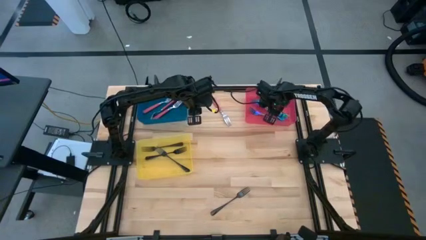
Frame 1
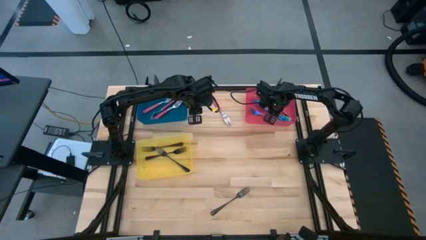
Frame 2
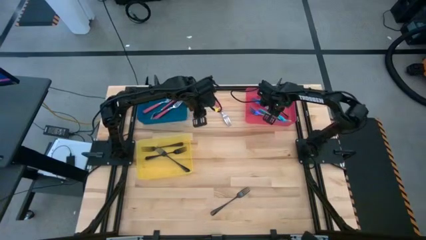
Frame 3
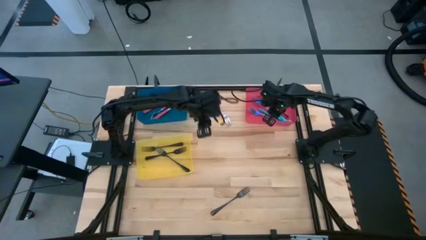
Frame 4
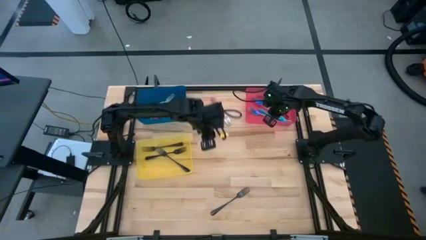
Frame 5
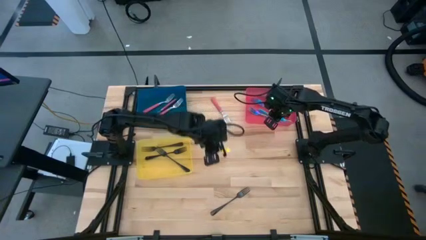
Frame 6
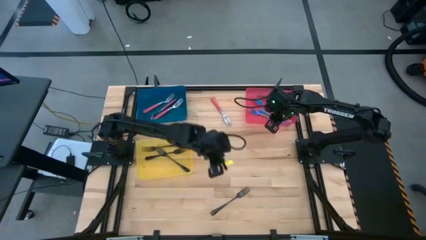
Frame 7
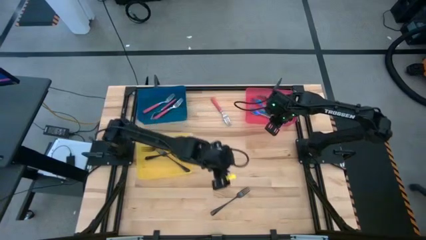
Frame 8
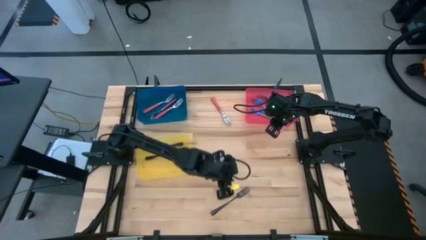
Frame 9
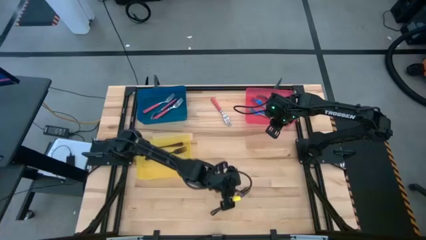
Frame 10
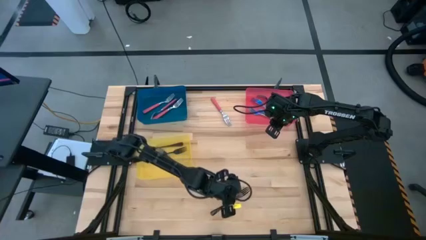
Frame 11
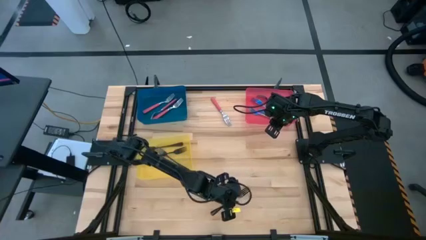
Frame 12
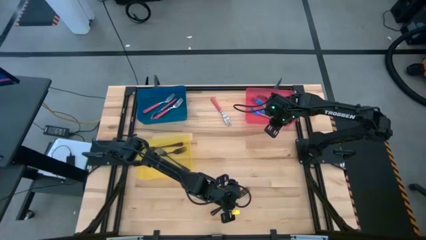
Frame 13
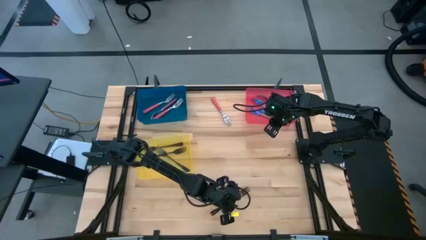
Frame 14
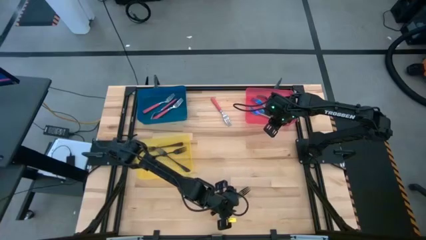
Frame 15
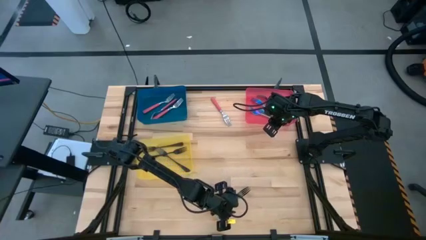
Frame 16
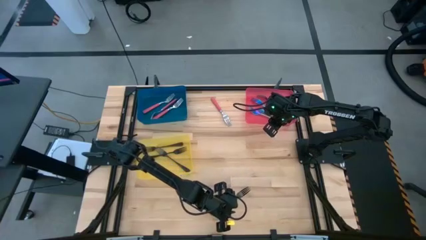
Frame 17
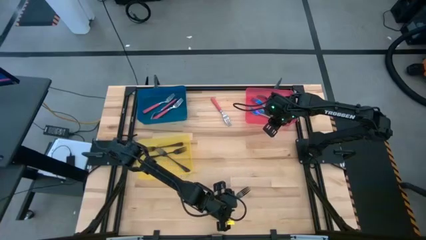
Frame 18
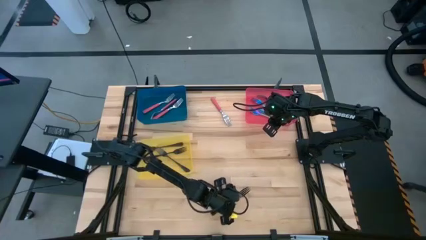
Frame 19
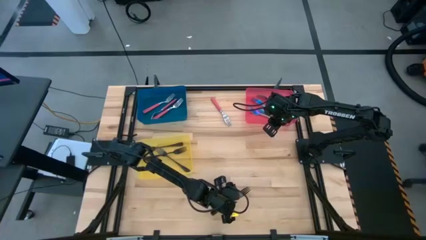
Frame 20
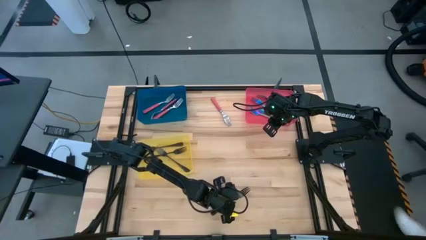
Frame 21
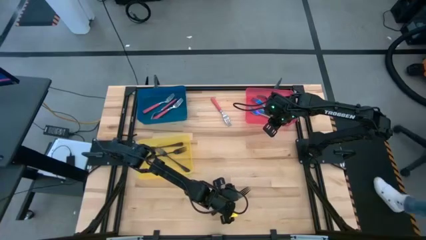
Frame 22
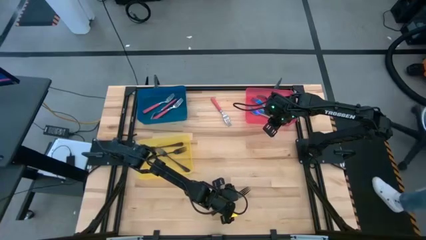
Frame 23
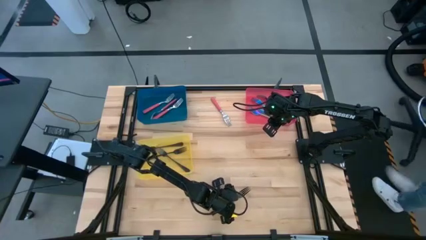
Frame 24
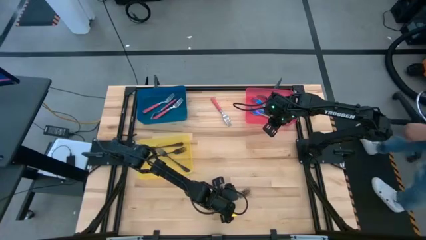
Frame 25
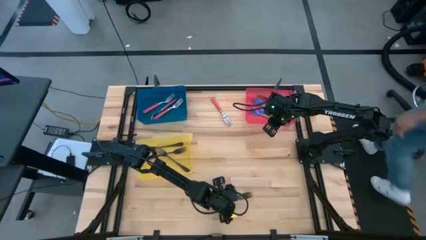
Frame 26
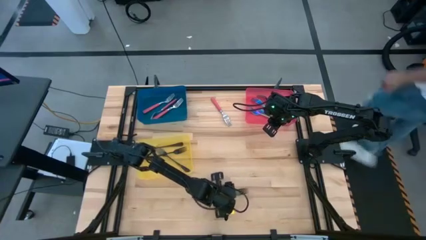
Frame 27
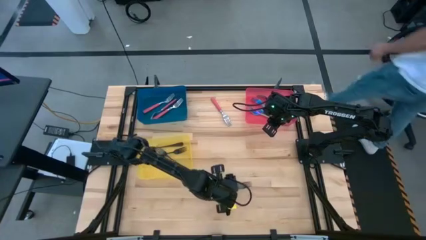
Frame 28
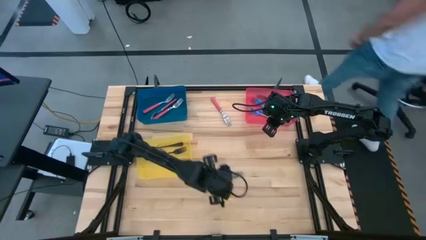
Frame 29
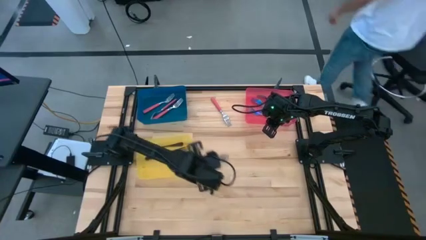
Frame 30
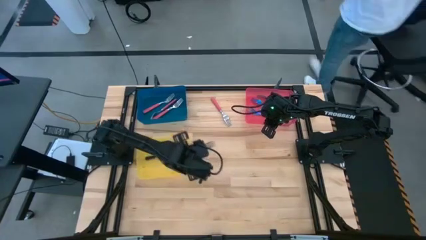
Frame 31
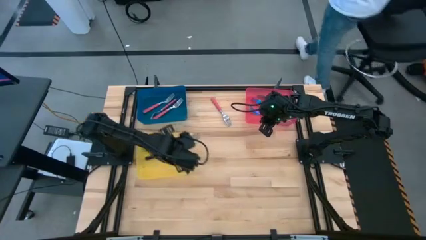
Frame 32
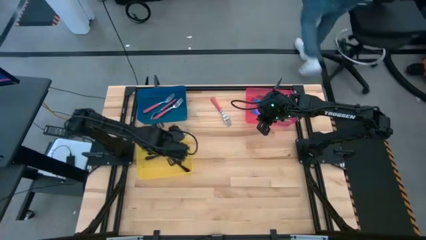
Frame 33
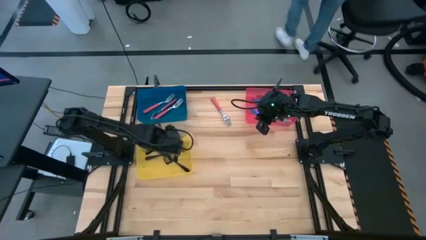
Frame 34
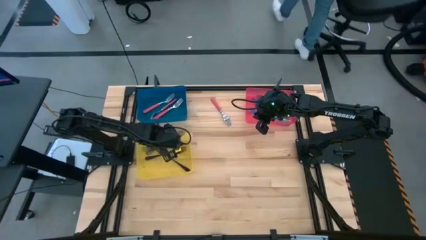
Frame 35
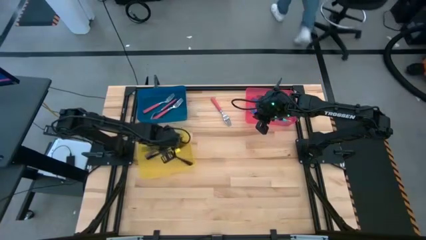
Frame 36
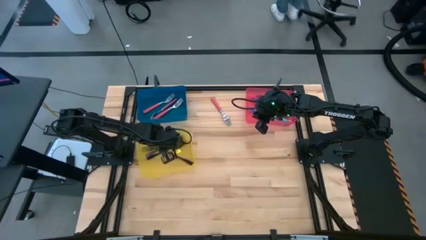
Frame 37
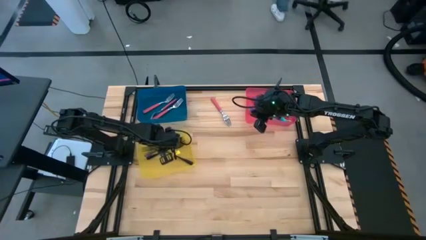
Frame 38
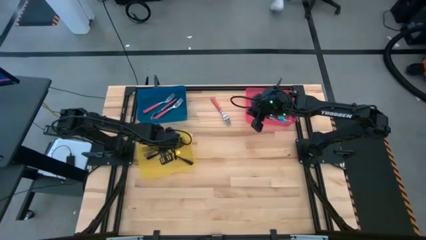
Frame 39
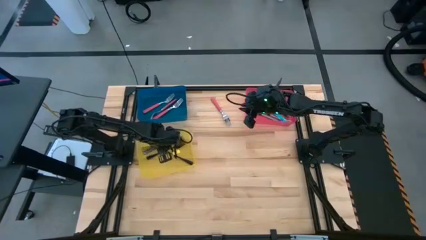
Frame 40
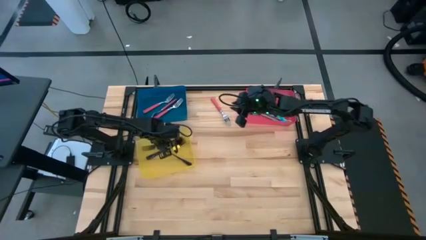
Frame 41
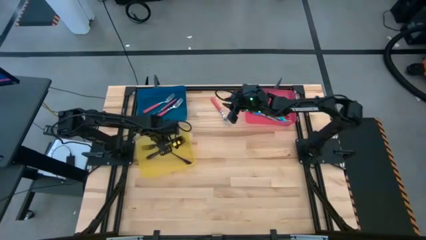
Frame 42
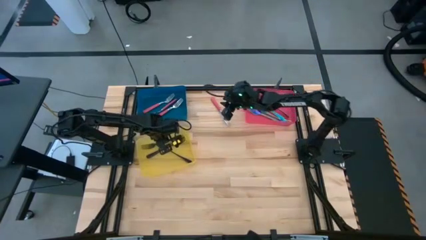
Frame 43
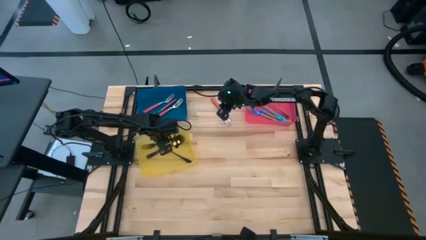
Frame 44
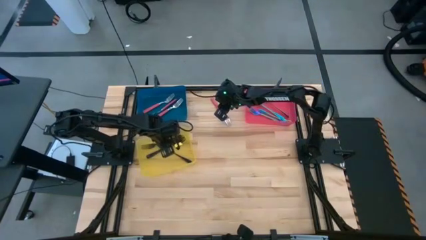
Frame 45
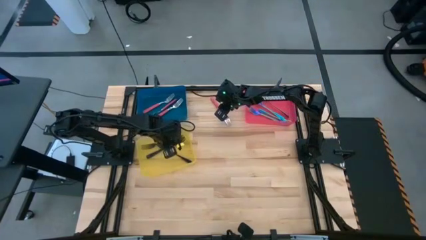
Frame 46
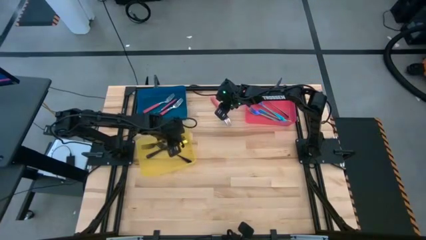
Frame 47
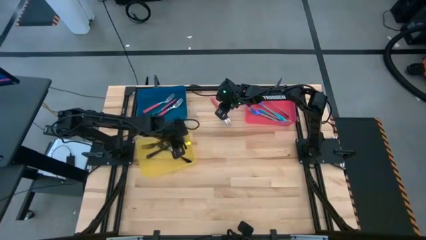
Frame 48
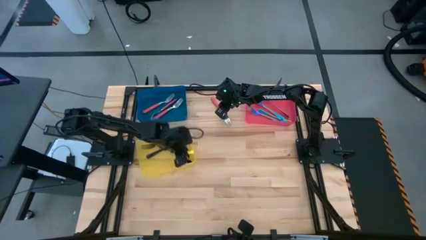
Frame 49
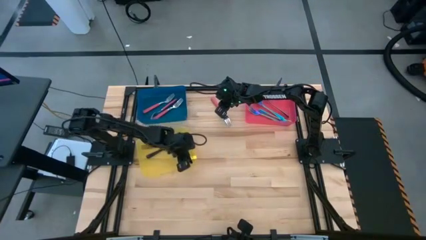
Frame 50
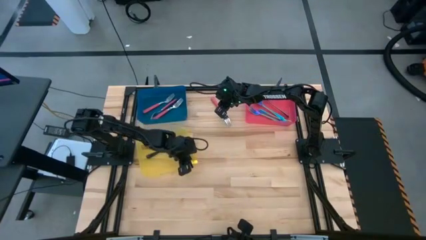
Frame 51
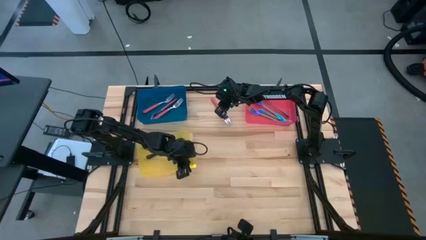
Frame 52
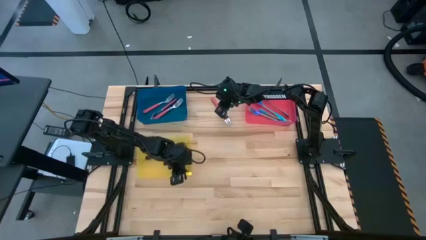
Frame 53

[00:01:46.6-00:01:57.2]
Task: Sort silverware by color (type)
Put the black fork into the yellow bin

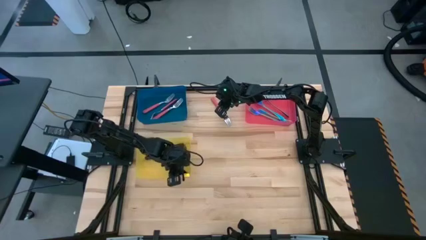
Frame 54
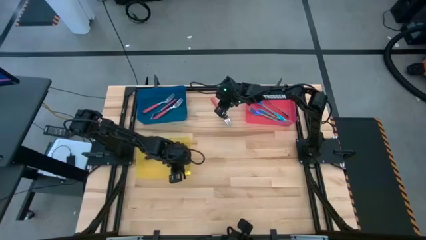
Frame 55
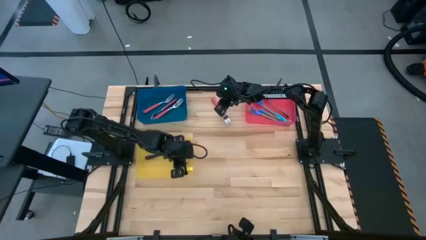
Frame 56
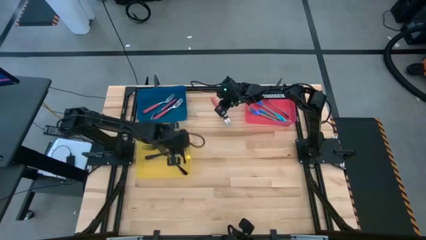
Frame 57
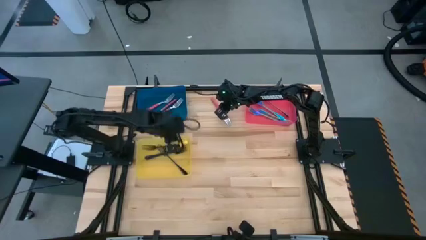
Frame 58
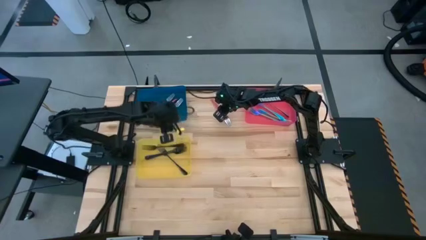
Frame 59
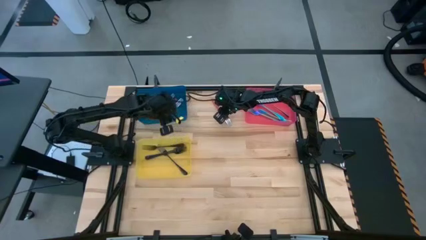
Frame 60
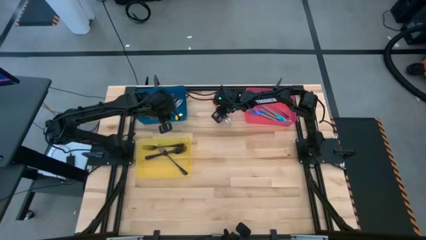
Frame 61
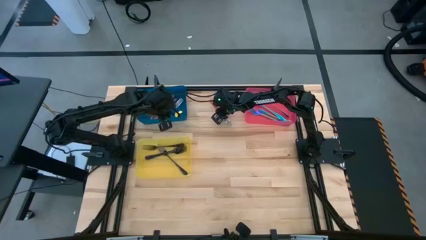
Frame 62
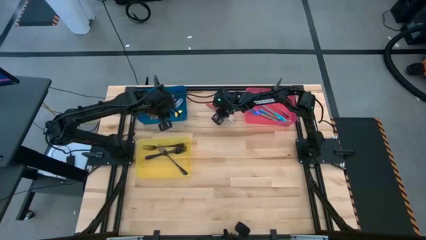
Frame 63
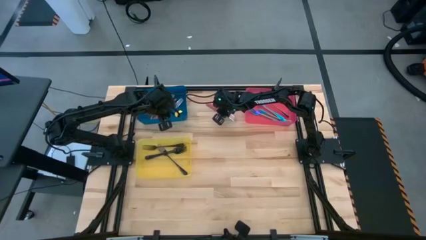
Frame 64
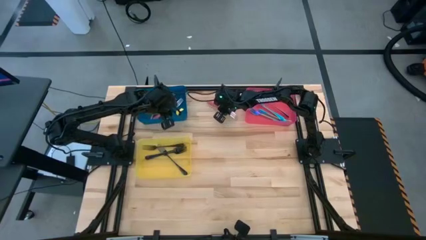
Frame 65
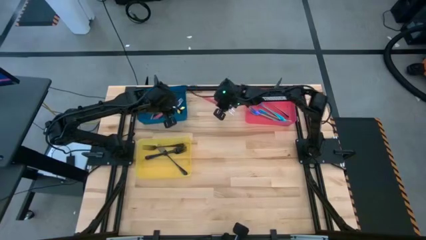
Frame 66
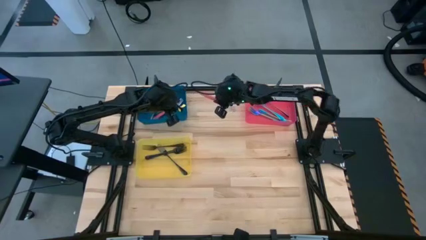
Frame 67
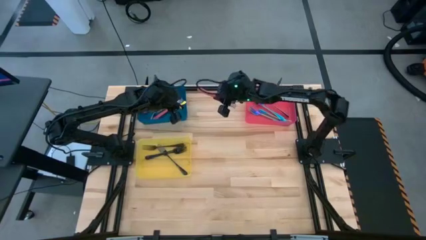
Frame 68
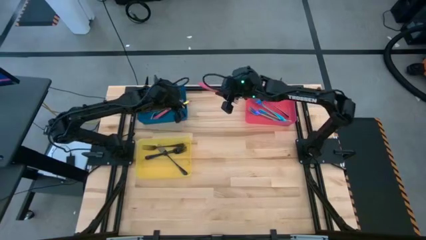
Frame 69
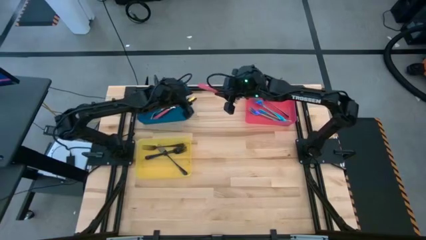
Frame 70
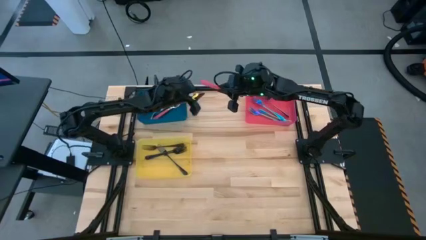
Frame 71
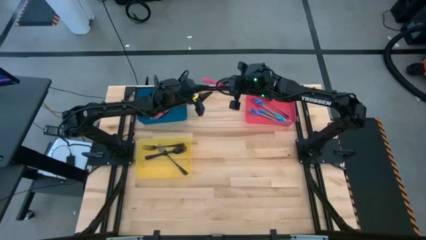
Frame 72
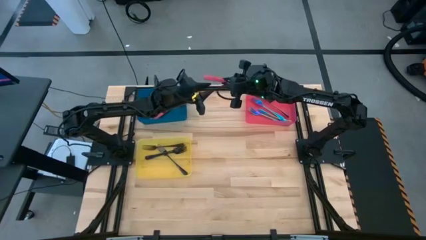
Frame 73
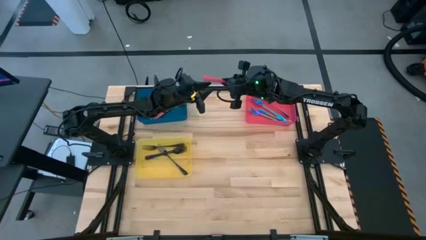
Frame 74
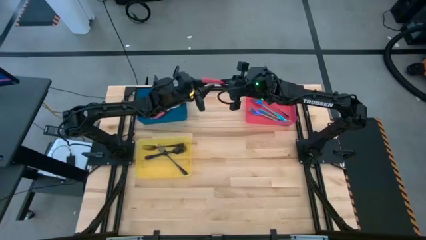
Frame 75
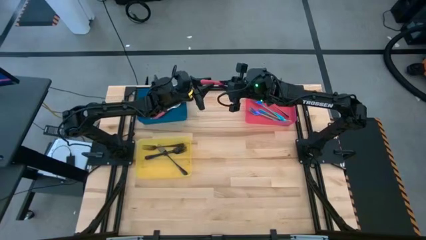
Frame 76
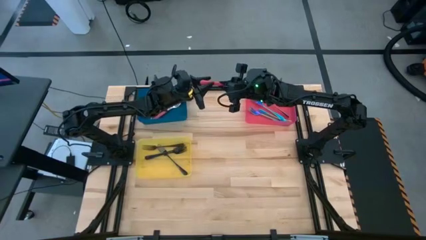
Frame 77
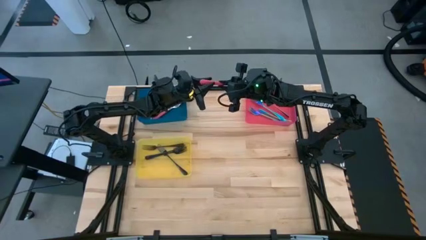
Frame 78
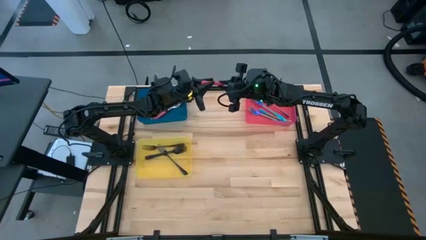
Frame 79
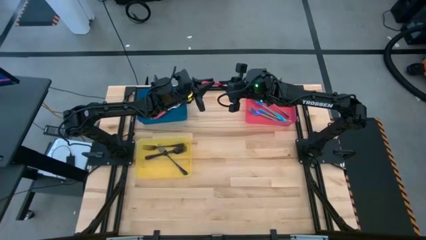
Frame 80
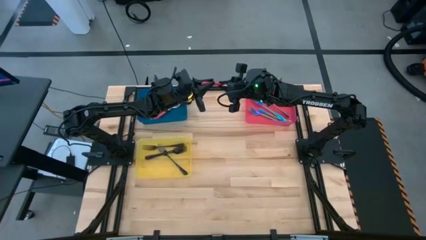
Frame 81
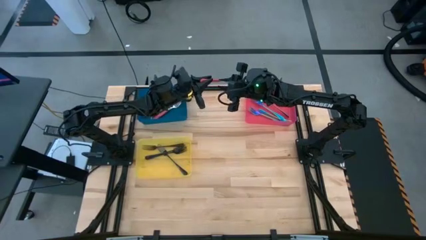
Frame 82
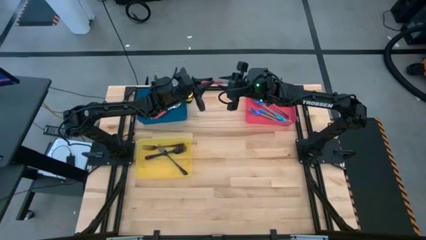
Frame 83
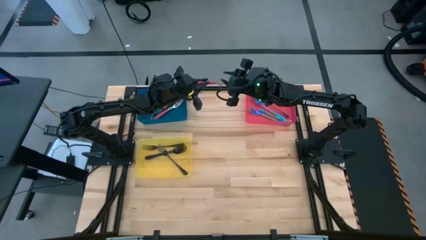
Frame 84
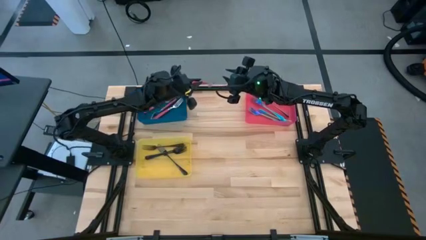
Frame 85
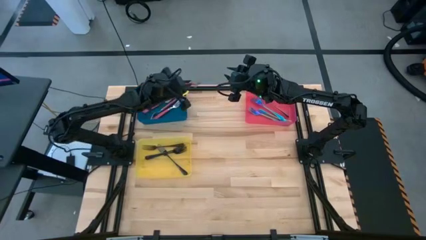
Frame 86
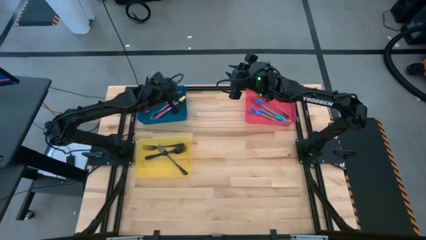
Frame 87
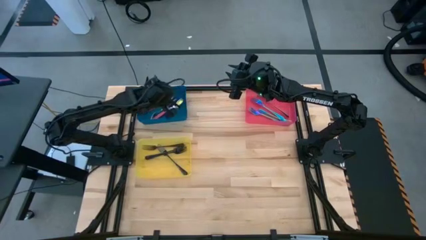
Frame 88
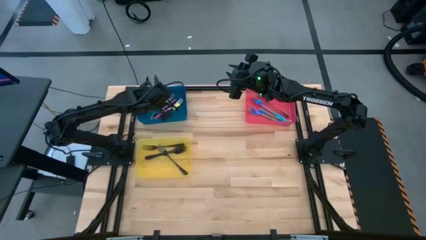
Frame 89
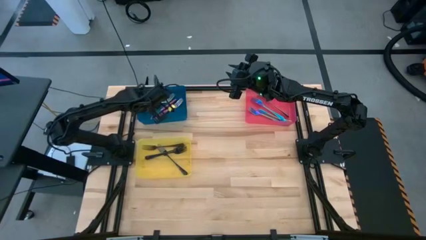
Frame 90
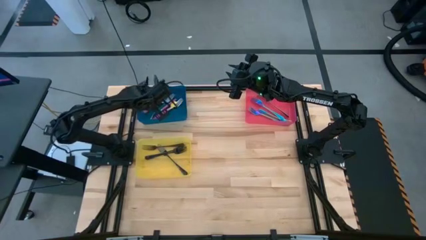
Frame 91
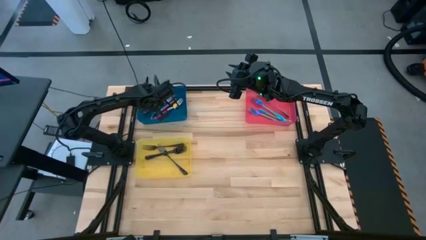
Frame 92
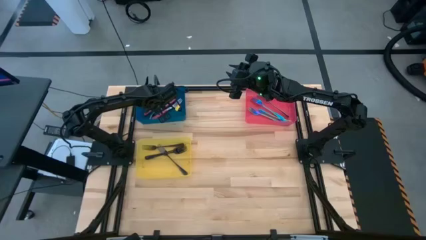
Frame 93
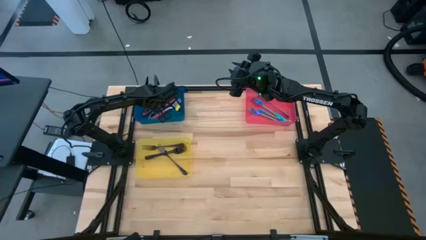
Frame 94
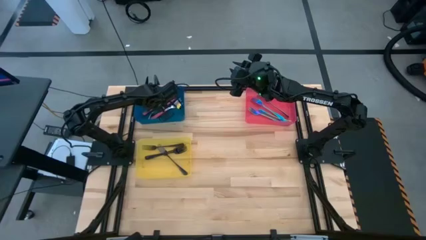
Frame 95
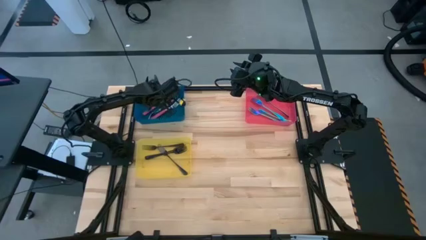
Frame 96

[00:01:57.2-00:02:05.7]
Put the pink fork into the blue bin
